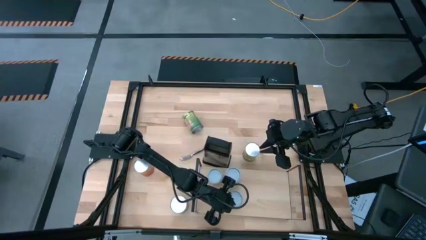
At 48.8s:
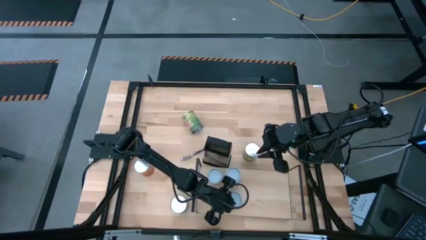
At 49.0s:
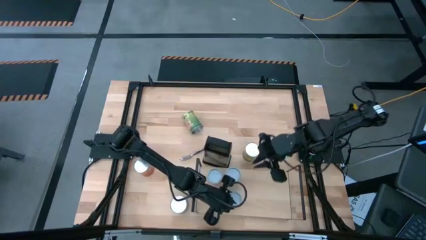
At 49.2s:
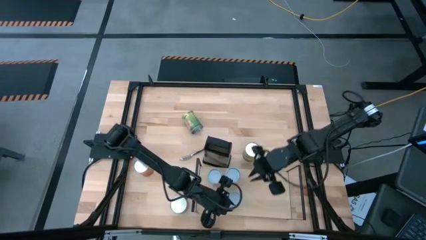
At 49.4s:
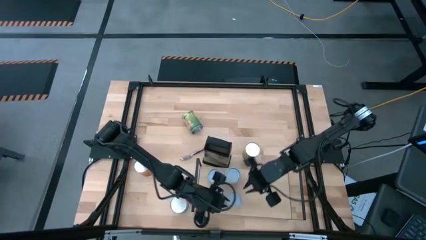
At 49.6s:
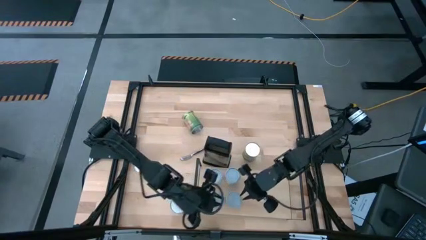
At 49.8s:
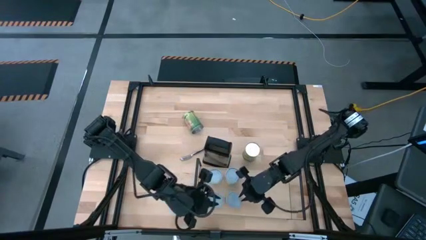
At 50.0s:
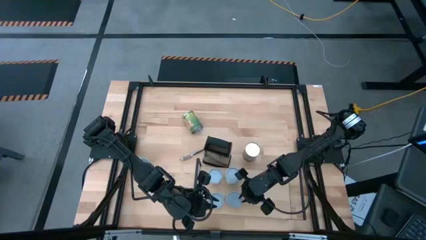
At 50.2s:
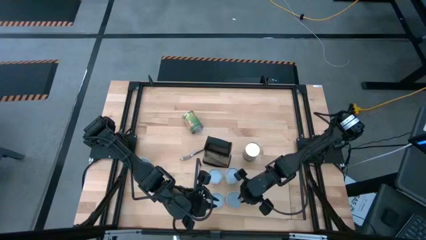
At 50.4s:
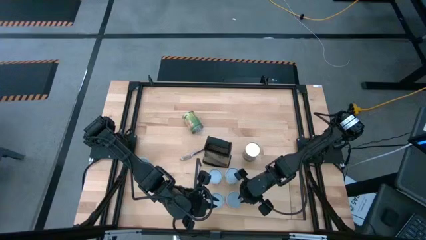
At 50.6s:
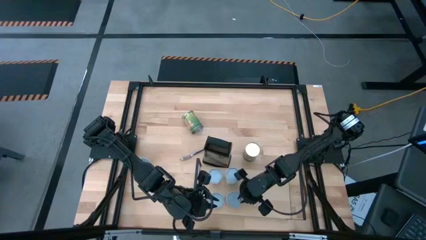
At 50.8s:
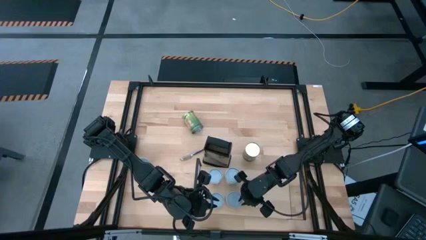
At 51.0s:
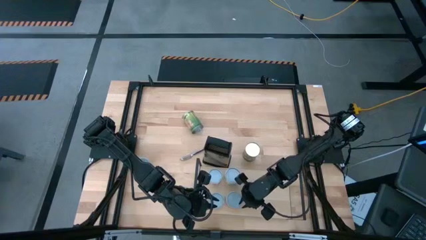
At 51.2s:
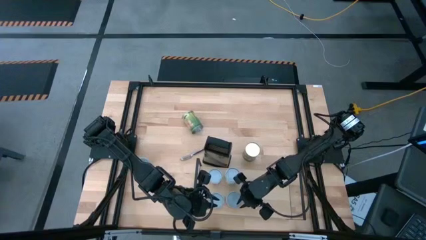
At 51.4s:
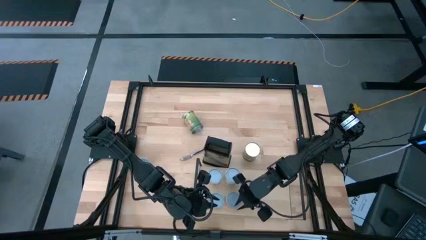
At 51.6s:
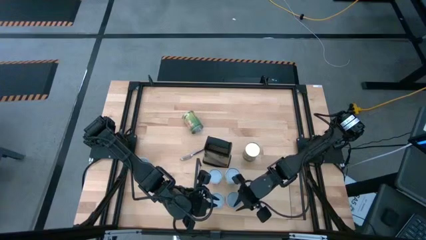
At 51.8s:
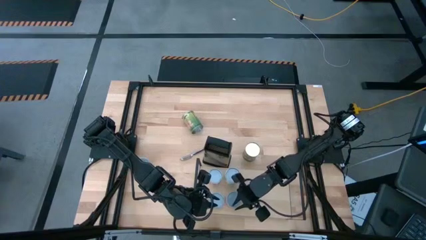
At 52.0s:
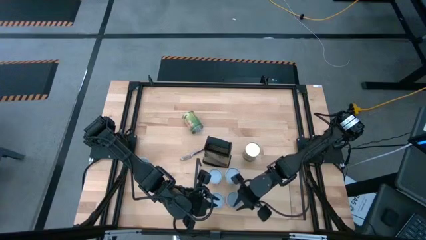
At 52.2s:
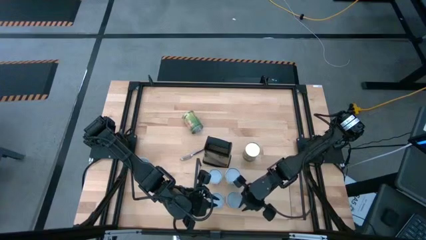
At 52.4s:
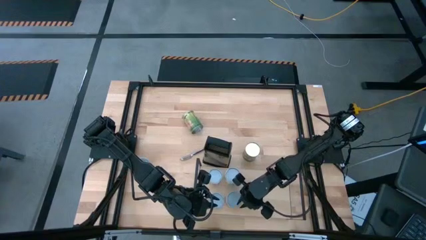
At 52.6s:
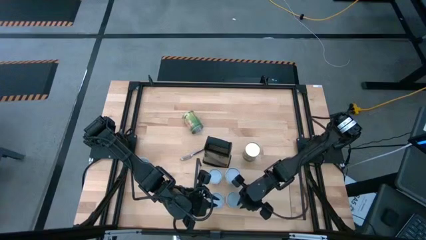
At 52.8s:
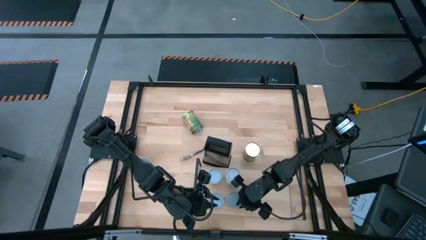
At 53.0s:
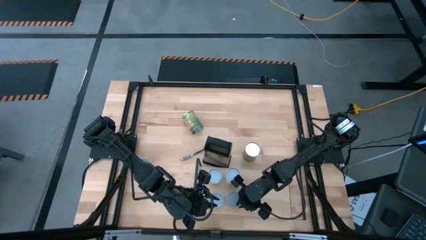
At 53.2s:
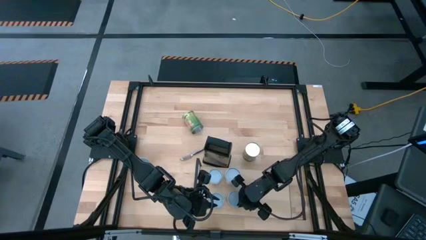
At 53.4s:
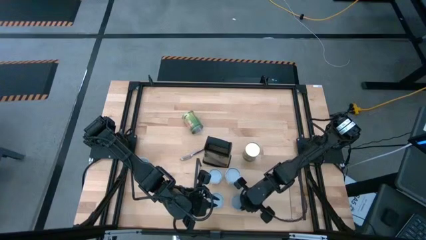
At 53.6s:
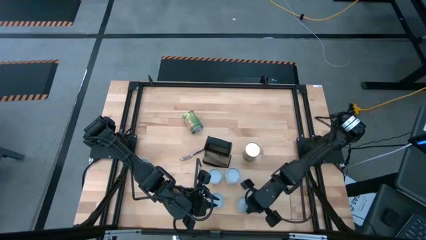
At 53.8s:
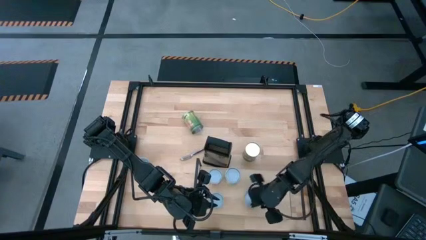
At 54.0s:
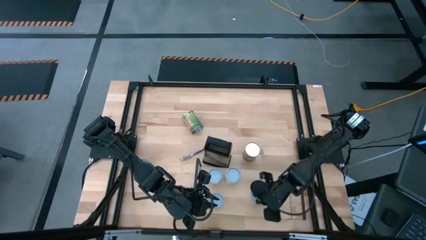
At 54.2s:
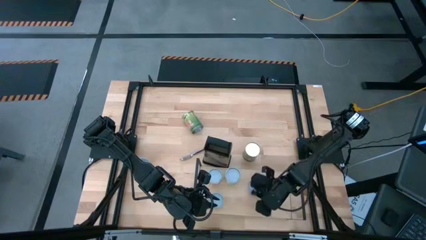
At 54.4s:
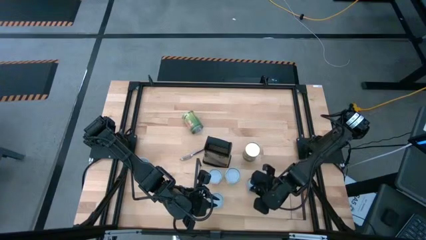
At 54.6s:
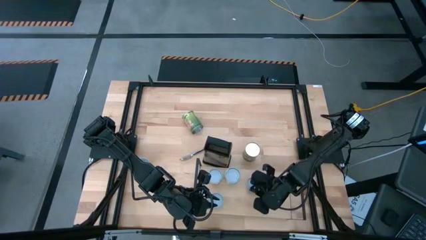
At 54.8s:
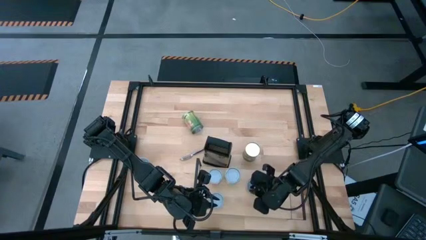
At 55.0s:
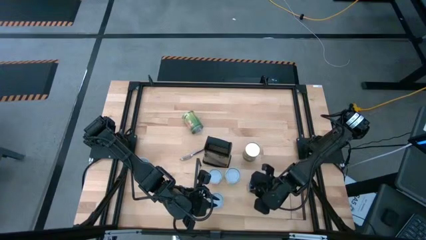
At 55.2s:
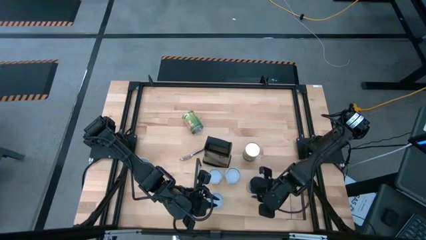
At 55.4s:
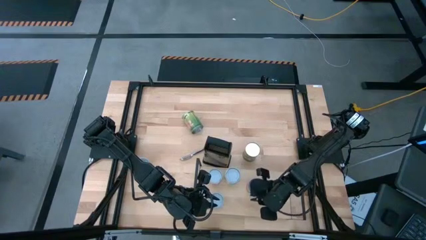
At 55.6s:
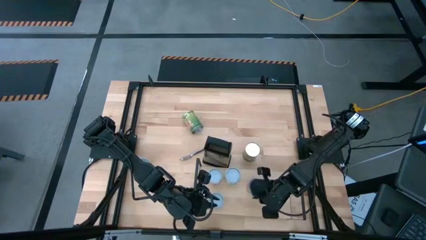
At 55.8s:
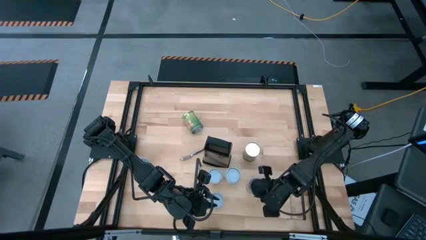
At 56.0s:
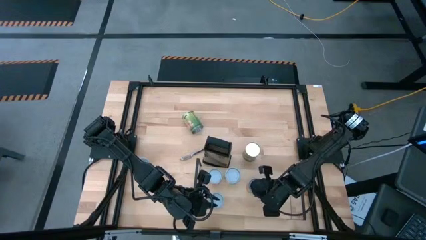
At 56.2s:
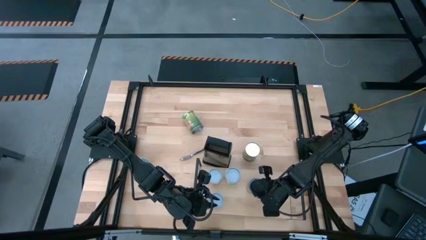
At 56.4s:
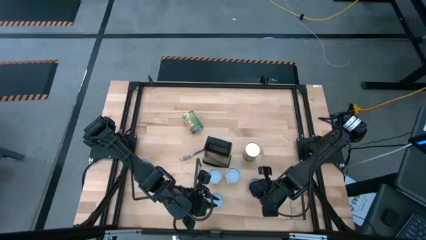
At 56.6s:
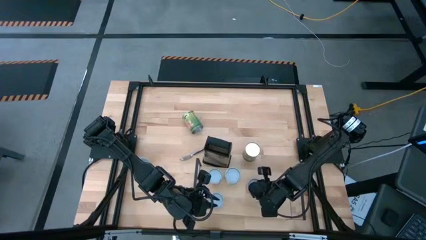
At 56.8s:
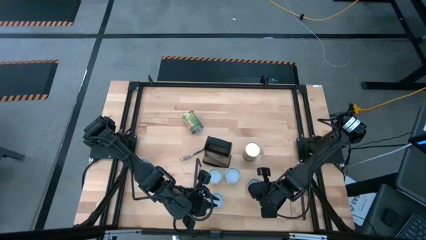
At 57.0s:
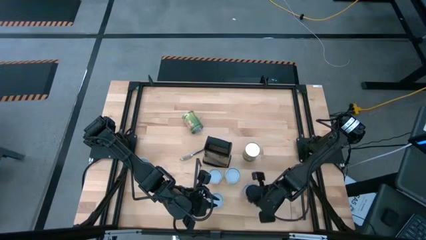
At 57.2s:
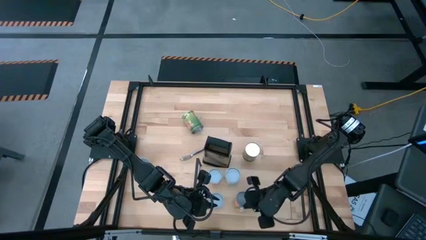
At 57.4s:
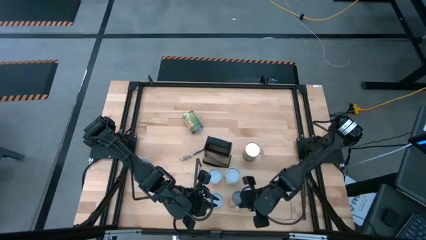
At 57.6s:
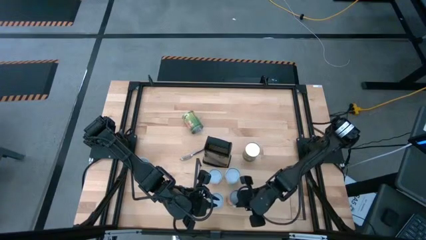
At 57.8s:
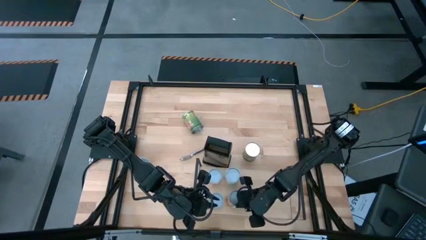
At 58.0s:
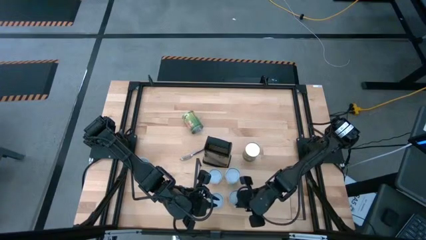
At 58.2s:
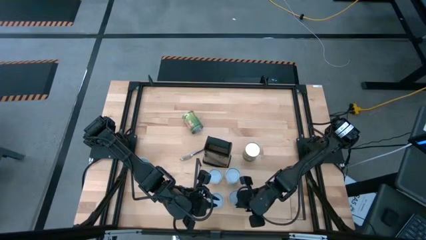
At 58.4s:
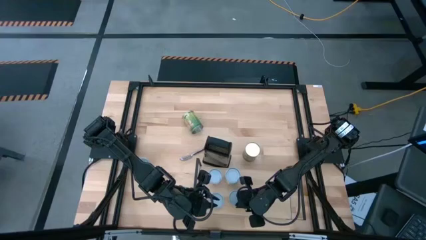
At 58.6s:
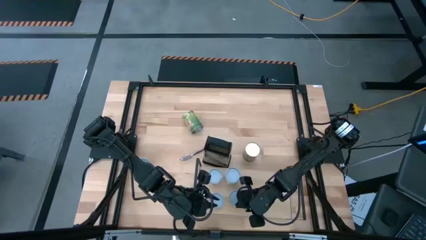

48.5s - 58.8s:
Task: Pick and place cans onto a shelf
Put the canned mandarin oranges on the shelf

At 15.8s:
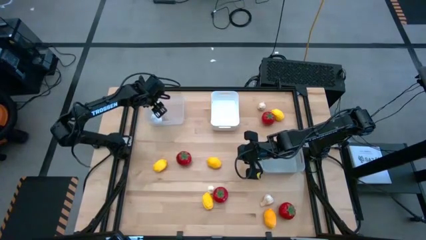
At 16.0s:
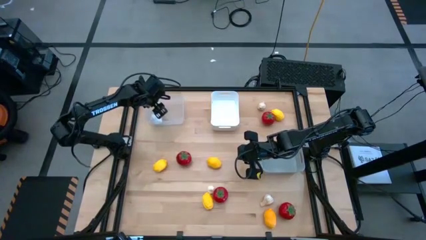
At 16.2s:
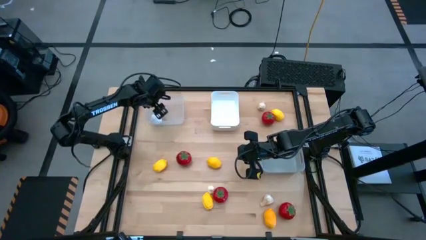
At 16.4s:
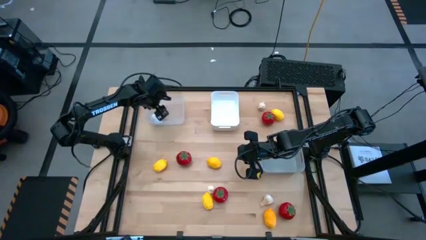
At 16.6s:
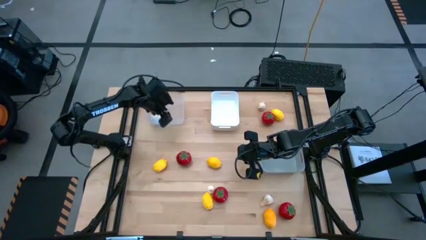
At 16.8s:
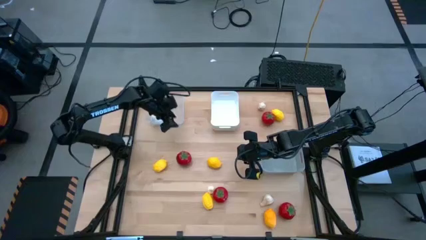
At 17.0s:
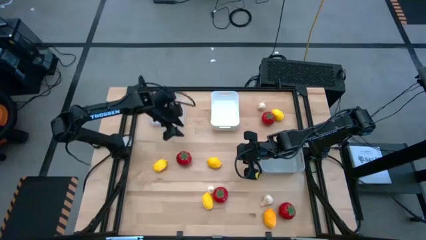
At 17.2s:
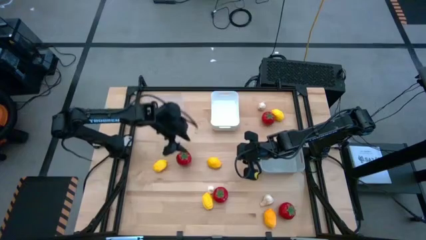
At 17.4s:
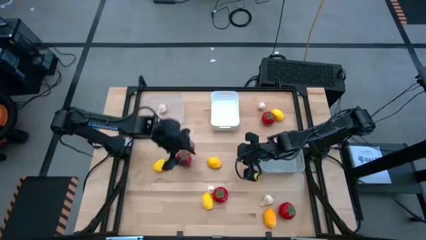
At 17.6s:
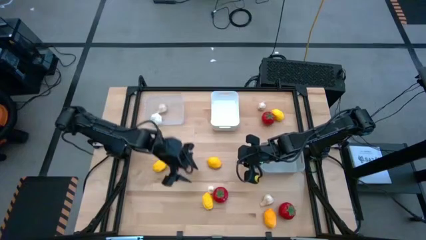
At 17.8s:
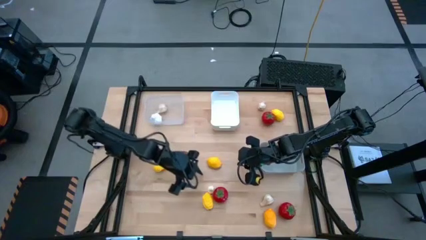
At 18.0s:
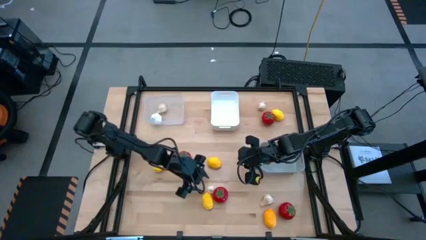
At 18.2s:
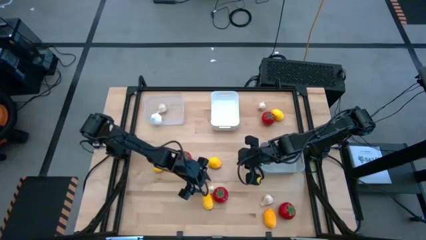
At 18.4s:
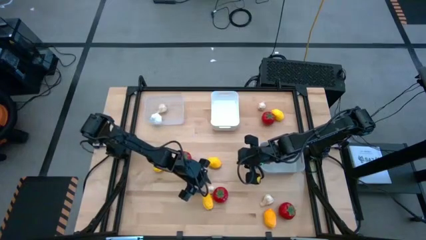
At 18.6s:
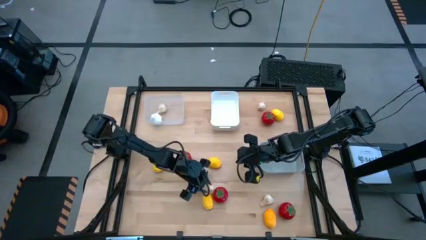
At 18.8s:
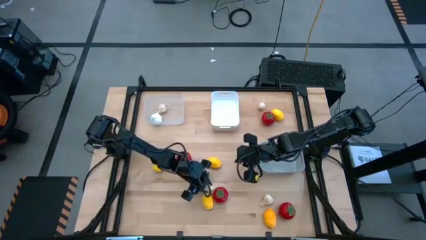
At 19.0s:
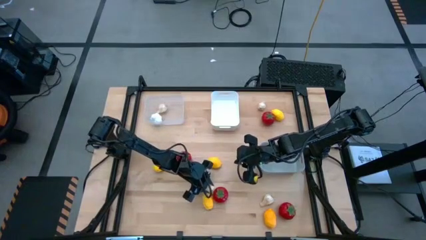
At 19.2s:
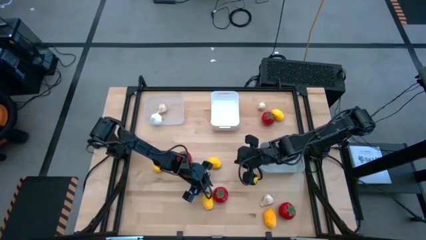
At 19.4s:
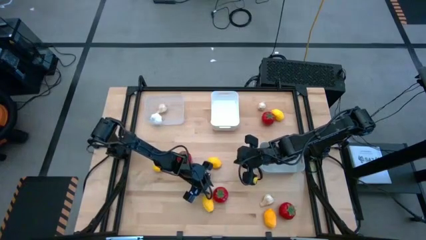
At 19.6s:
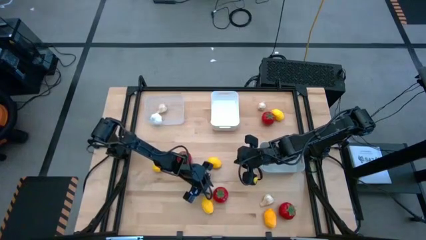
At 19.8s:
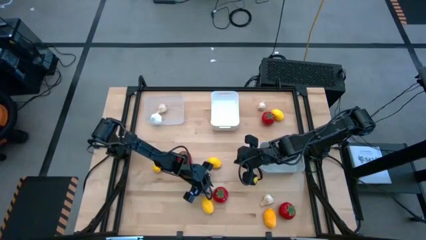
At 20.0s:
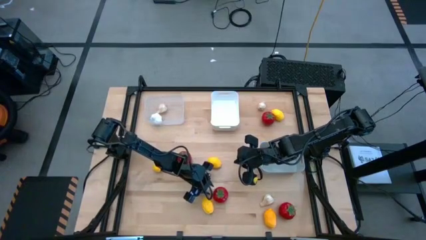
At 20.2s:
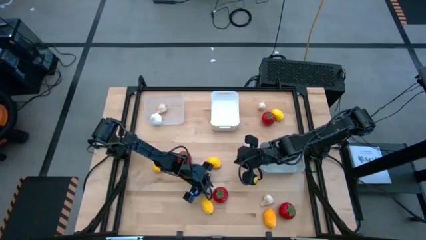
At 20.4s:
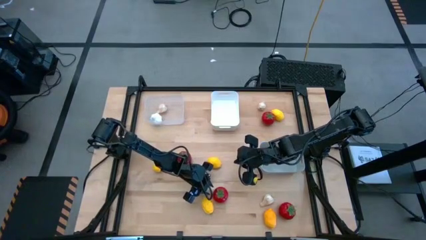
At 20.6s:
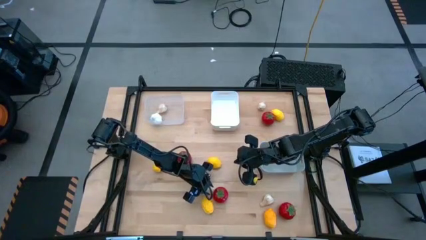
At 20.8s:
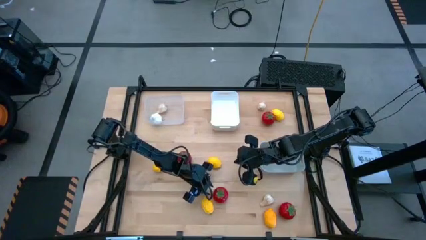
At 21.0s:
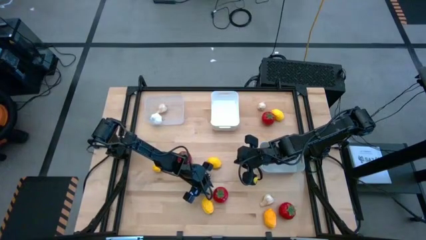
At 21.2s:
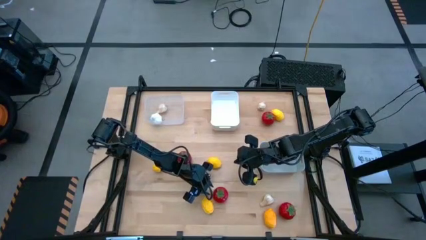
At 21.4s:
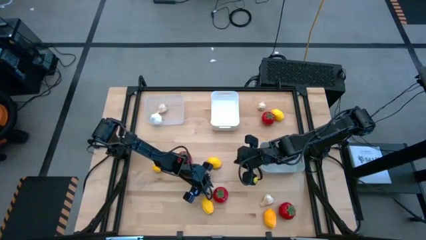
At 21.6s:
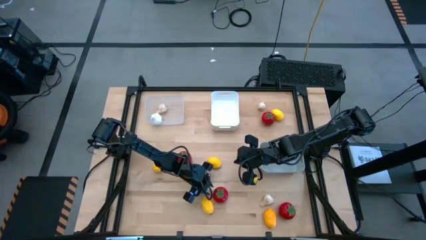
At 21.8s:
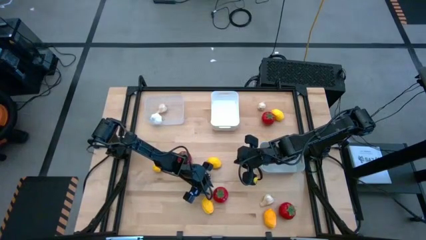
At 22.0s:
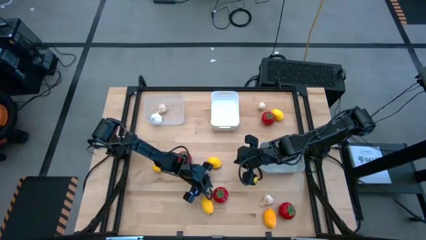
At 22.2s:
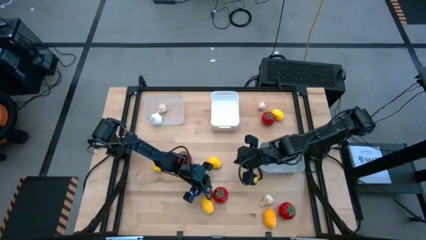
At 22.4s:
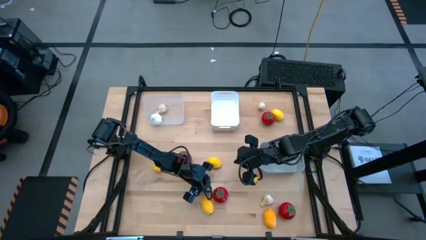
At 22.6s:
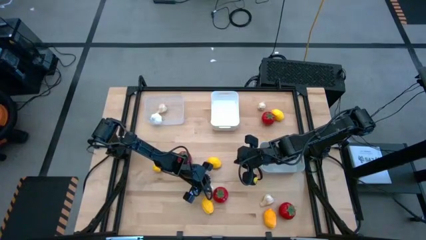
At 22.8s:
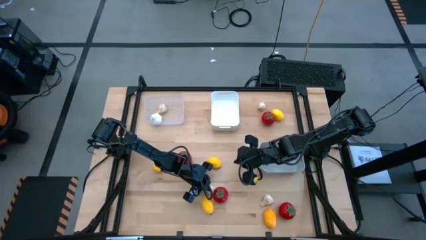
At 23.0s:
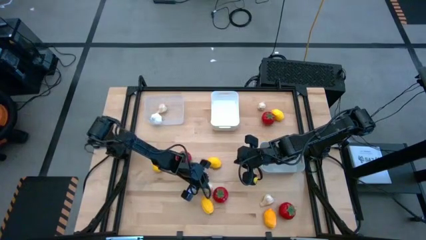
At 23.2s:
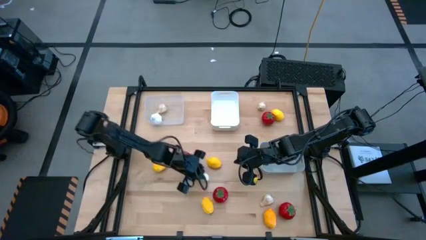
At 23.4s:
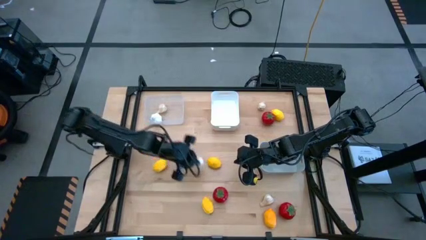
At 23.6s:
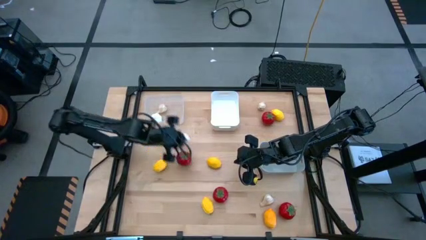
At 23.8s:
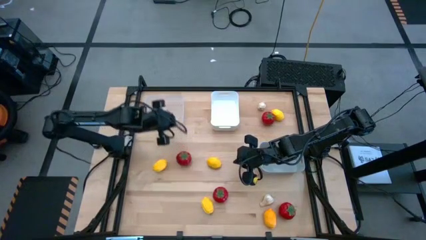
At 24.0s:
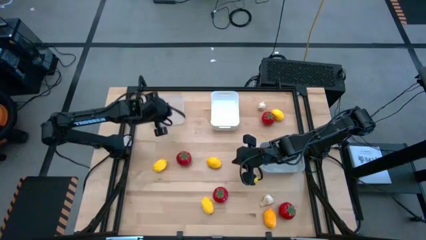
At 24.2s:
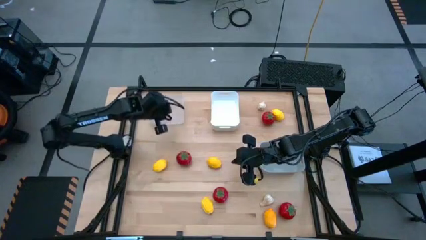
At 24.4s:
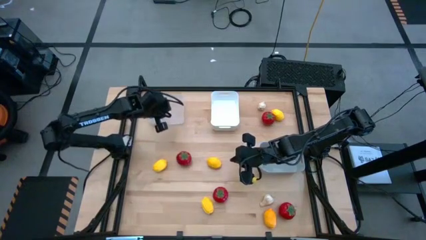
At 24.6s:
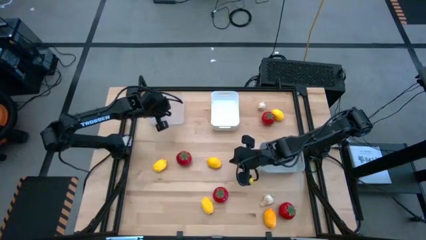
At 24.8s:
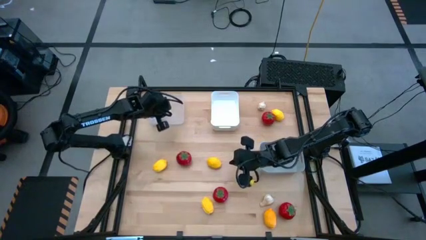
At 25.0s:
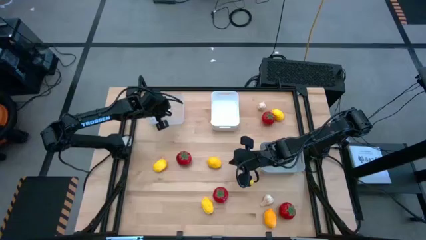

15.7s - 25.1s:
Task: Sort produce into baskets
Put the garlic into the transparent bin
